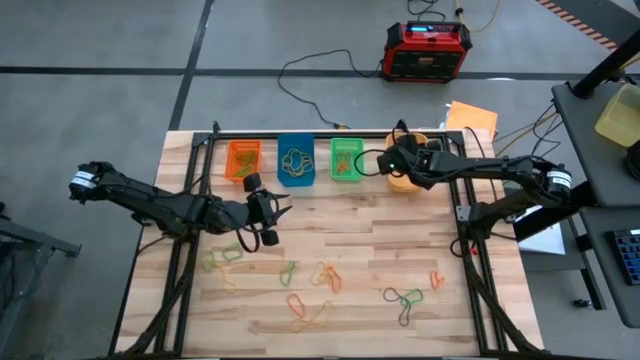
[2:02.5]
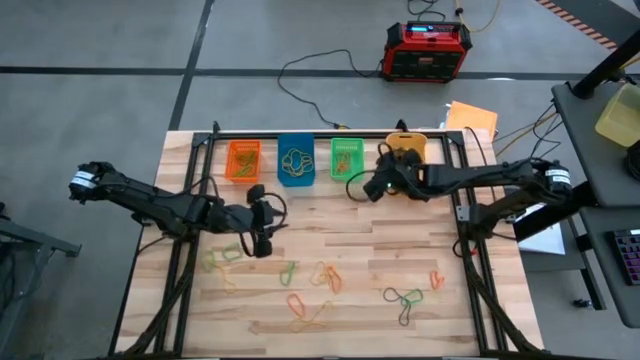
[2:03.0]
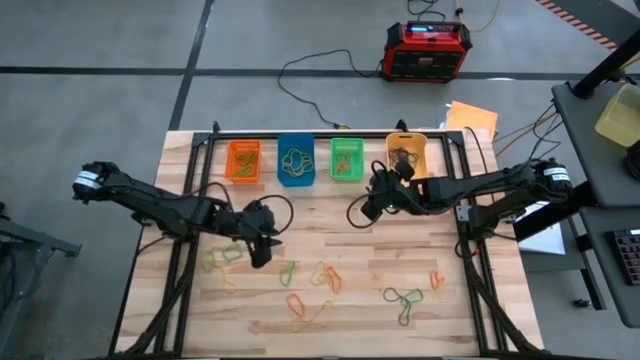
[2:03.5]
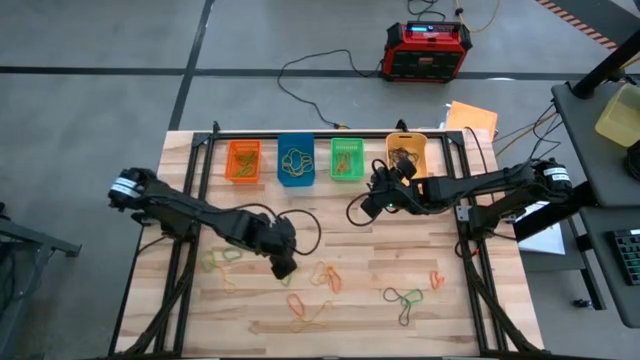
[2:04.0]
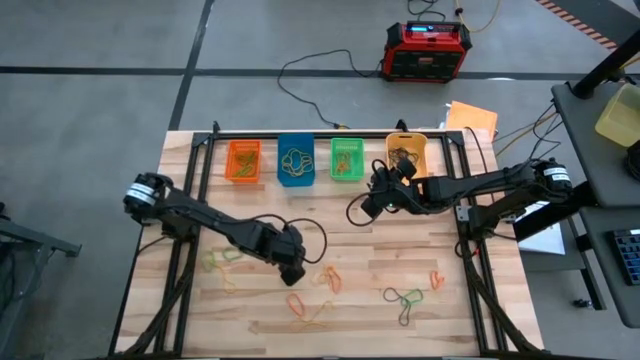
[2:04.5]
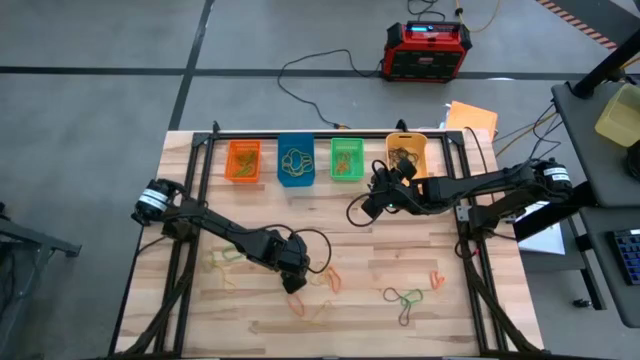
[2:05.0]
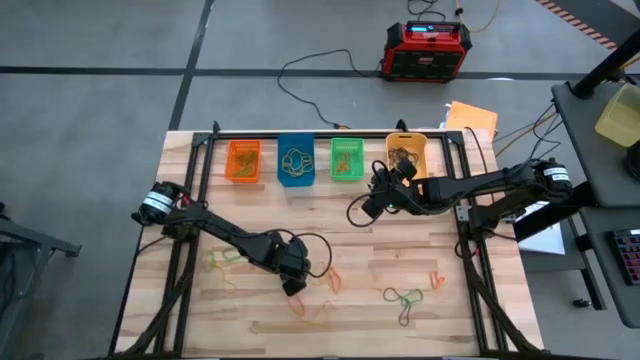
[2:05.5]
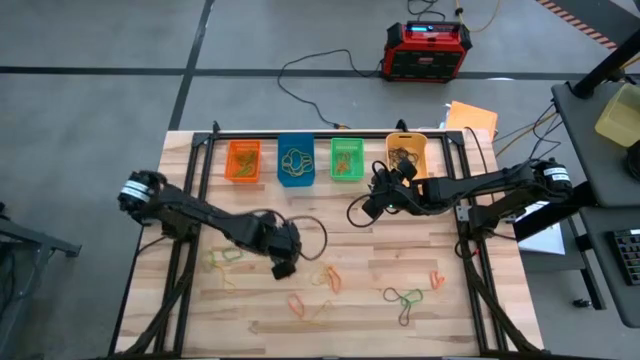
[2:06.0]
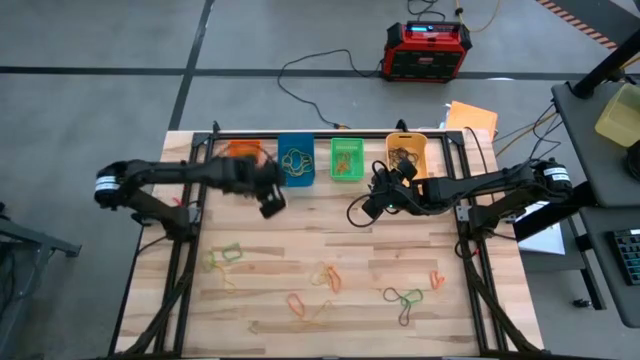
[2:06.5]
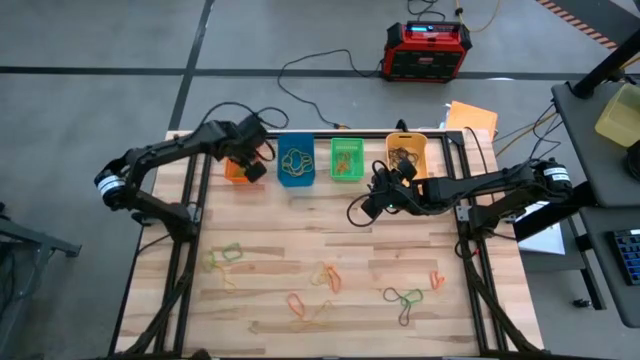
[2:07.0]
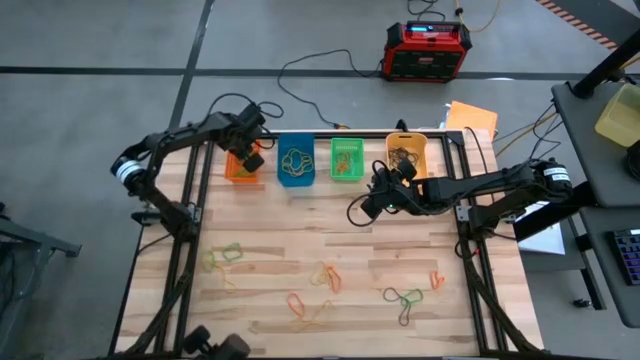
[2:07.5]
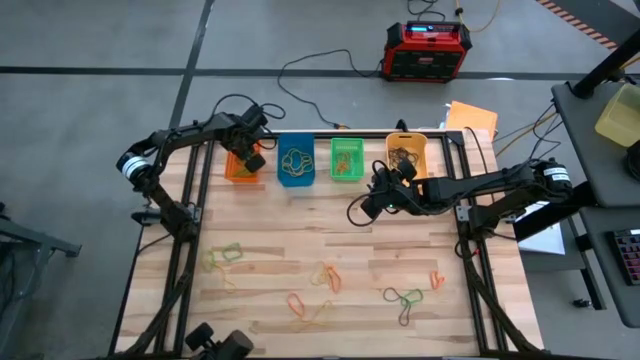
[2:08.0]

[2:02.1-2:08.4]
Task: Sort rubber bands into baskets
Put the green rubber band into the orange bin

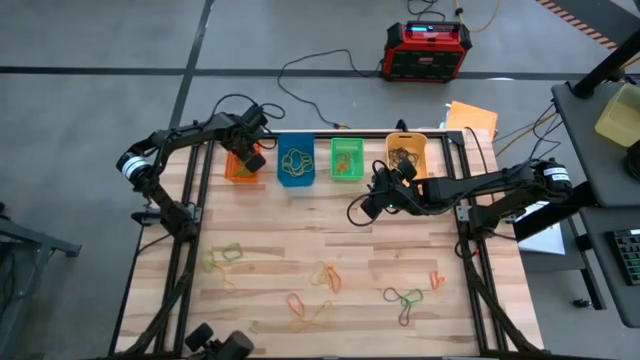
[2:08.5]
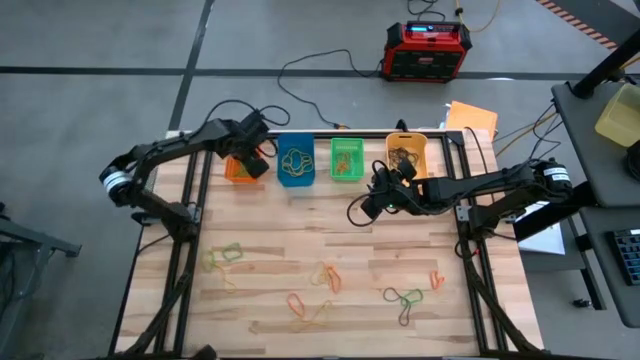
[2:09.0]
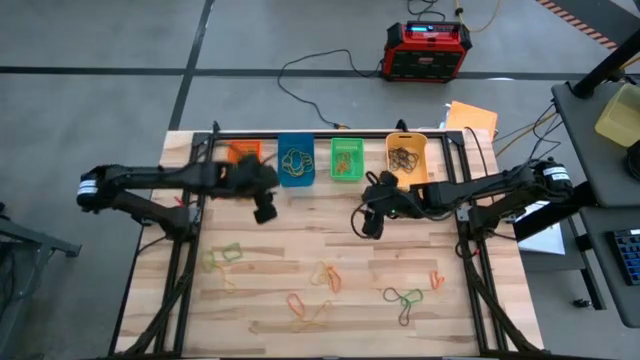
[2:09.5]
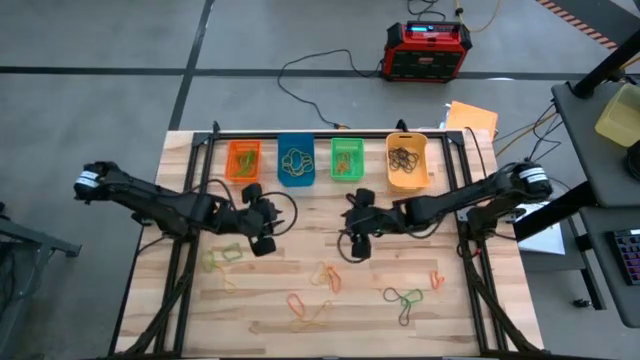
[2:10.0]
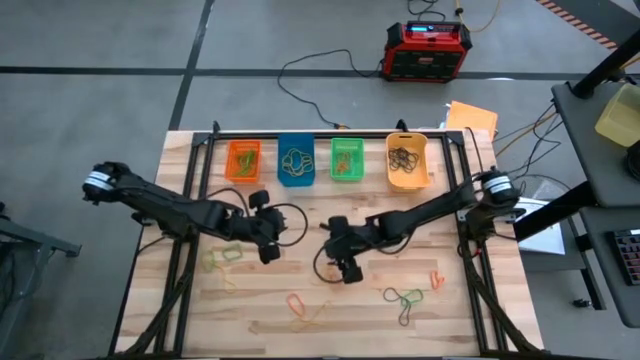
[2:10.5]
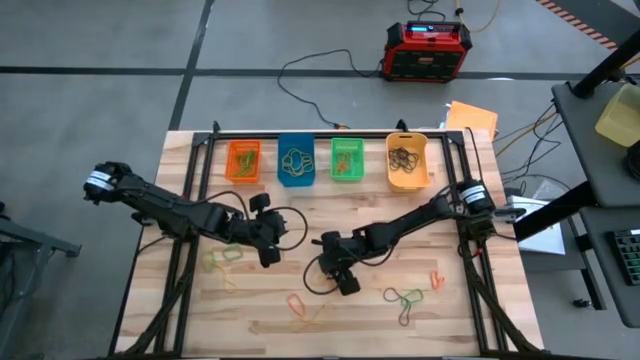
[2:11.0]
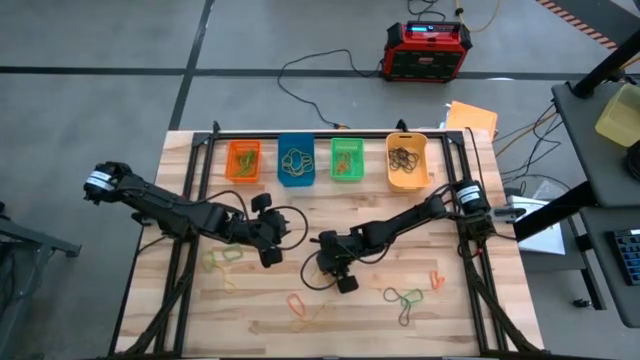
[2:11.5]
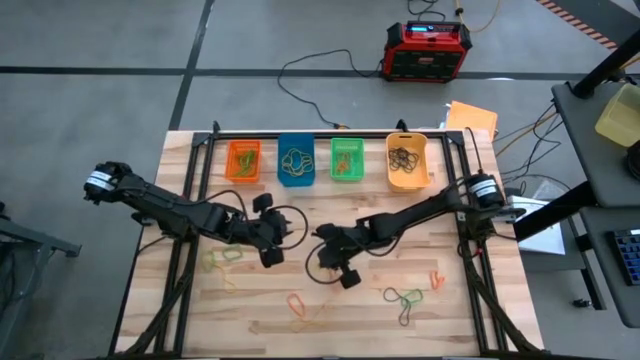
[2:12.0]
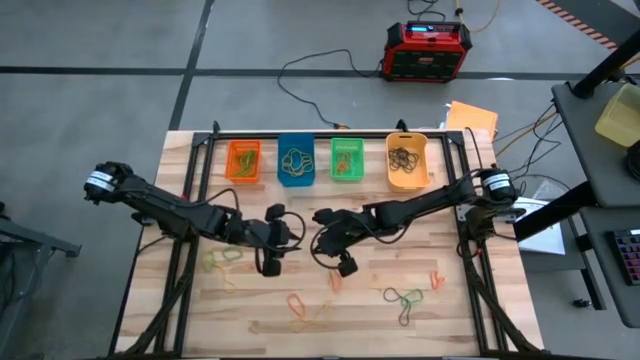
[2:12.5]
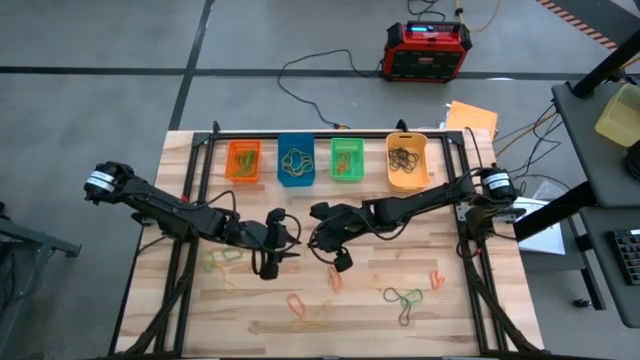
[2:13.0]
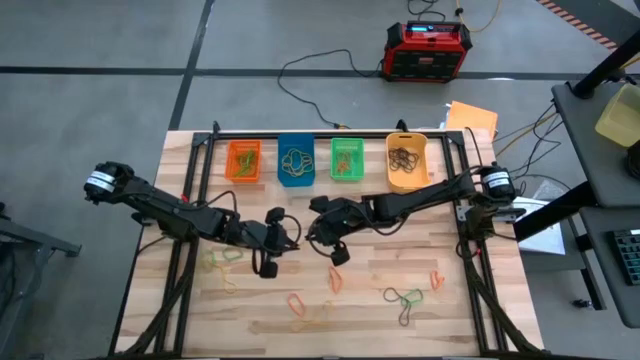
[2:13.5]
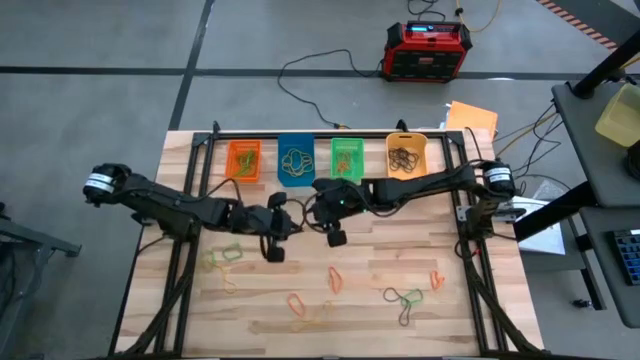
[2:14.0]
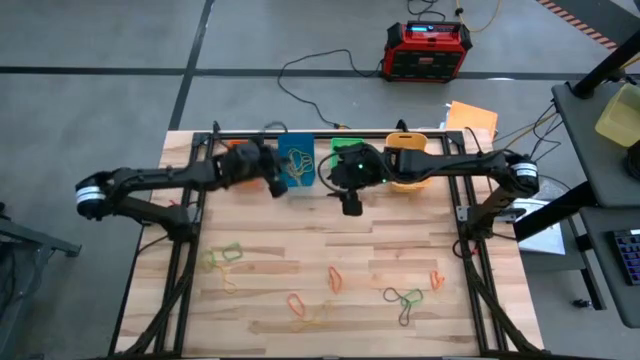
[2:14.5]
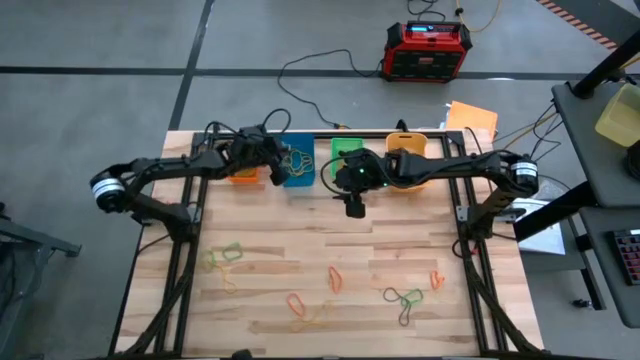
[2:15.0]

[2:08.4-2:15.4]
Put the yellow rubber band into the blue bin

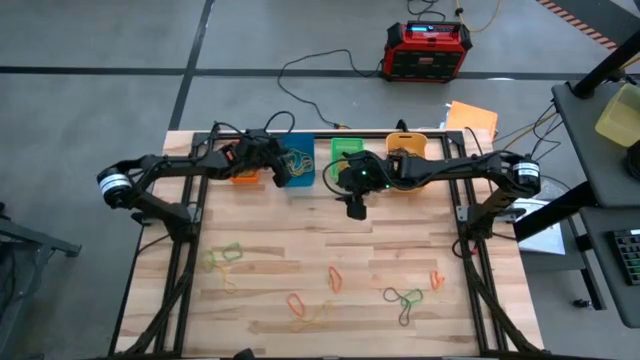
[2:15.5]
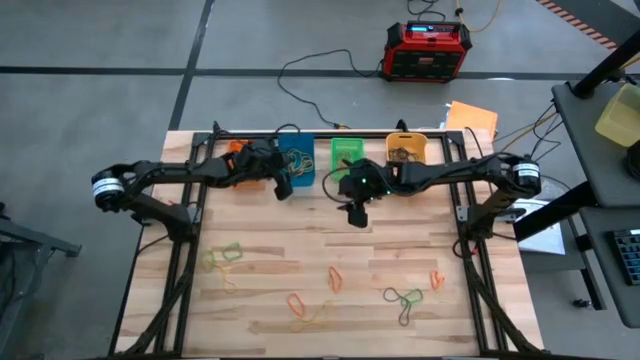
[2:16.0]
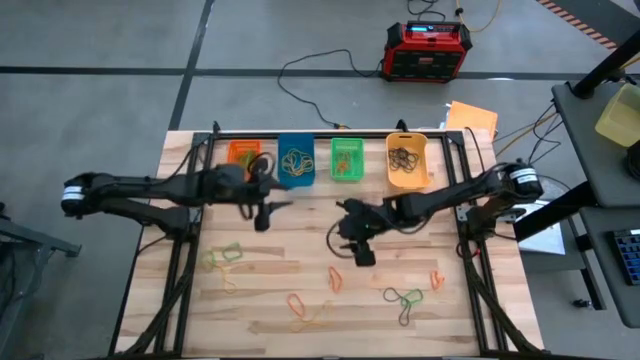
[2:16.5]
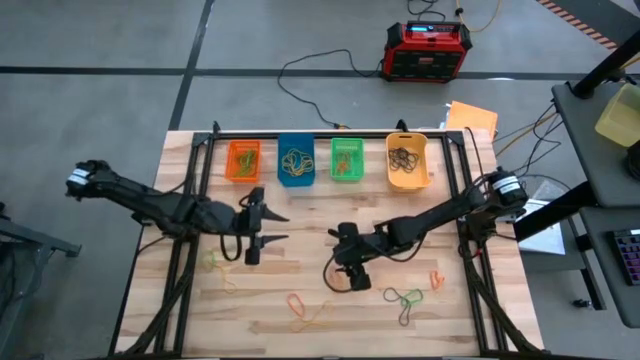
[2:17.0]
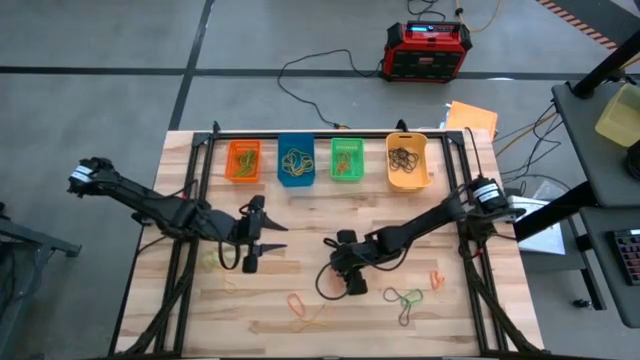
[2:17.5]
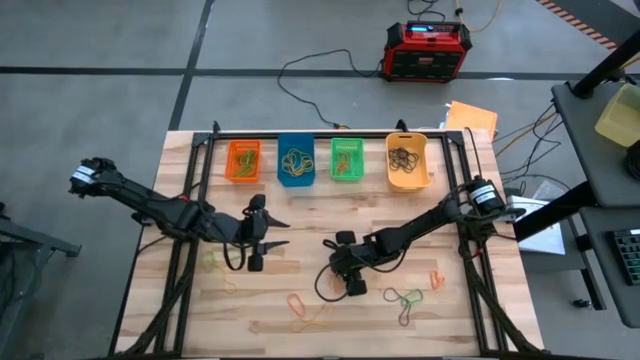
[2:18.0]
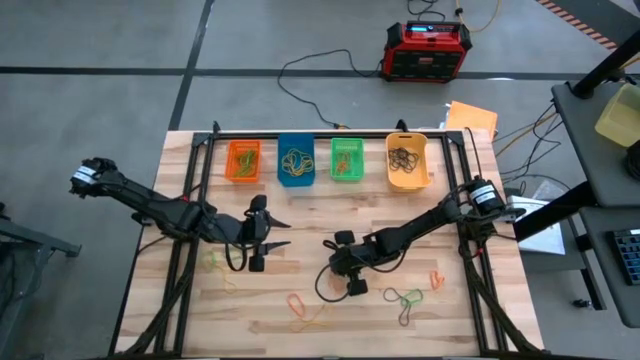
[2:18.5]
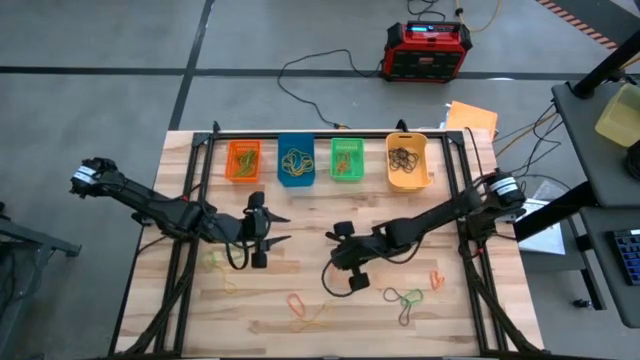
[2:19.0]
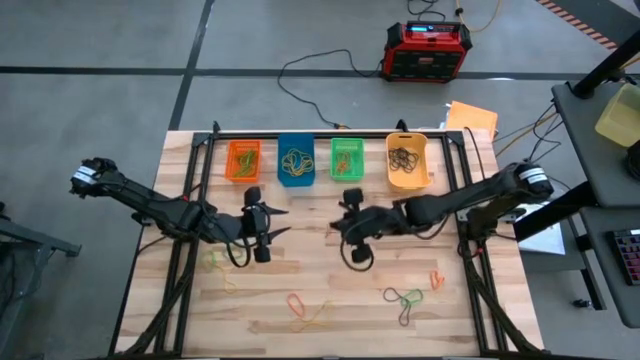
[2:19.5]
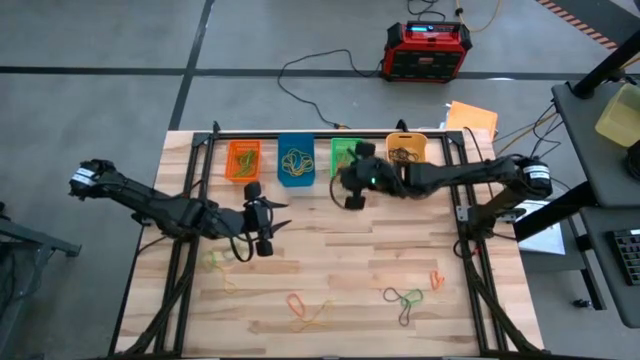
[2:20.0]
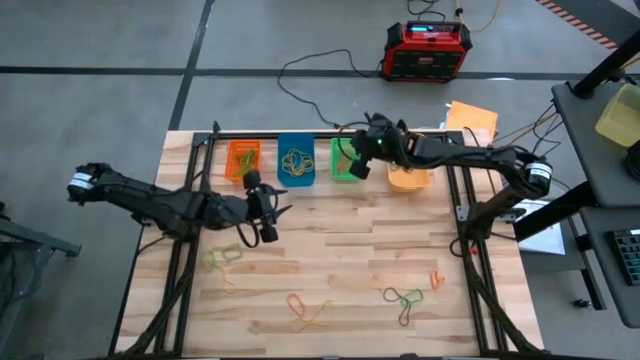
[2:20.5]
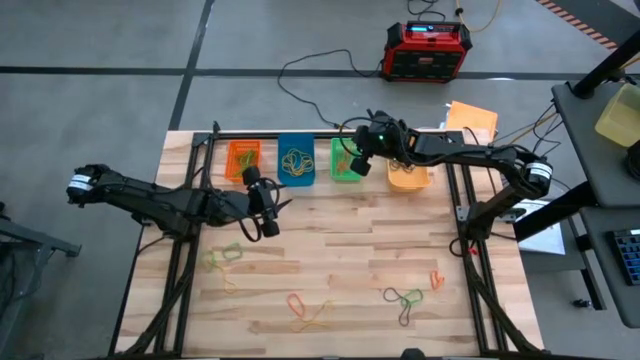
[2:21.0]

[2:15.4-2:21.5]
Put the orange rubber band into the green bin

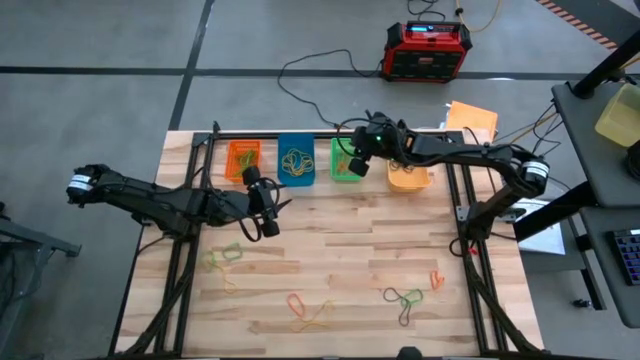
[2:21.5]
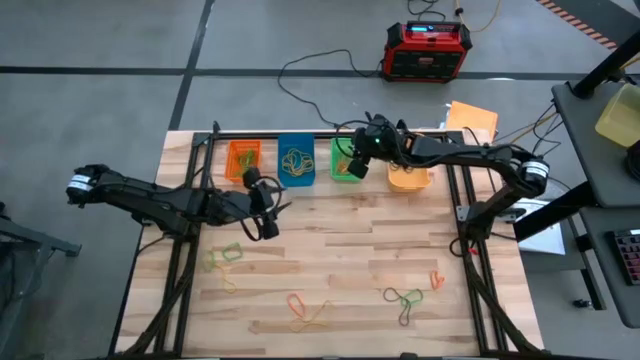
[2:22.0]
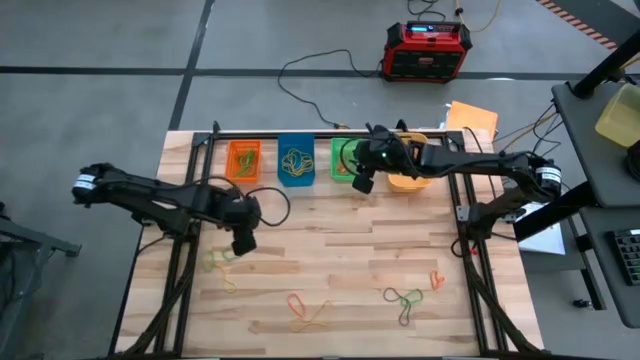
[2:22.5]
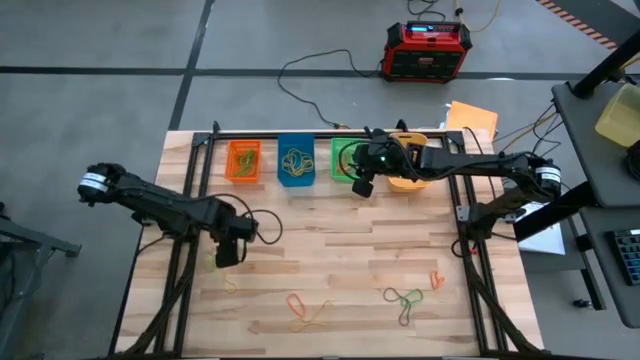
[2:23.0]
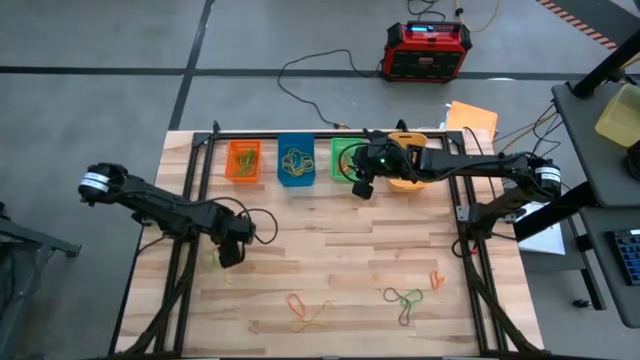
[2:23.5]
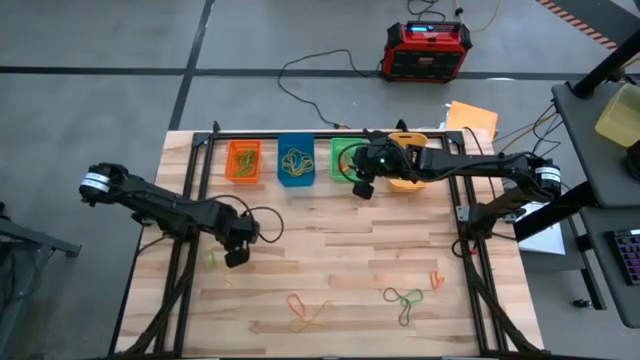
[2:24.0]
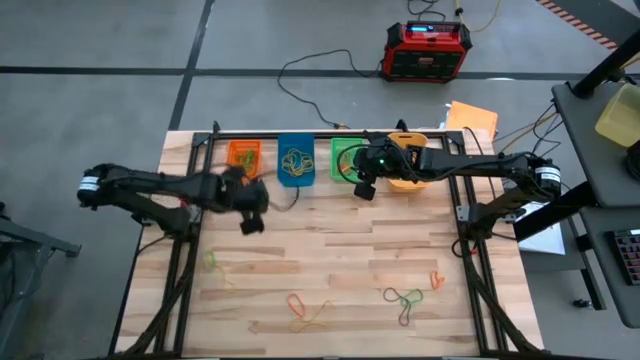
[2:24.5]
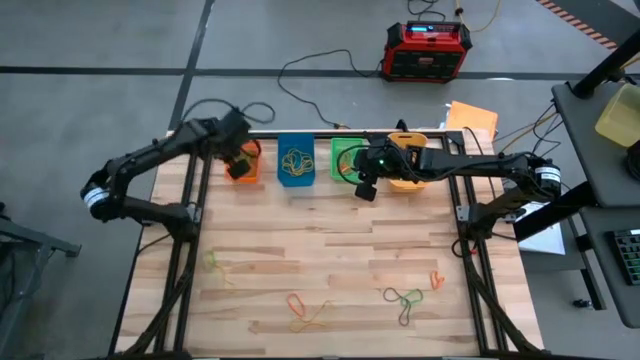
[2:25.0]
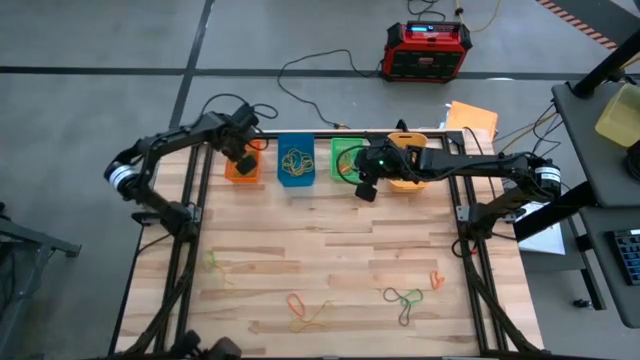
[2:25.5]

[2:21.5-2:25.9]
Put the green rubber band into the orange bin
